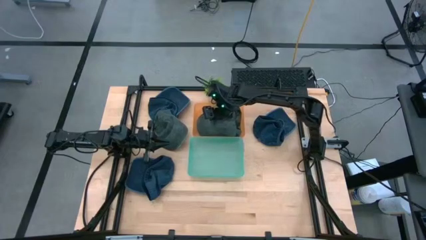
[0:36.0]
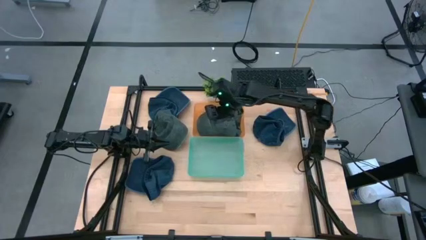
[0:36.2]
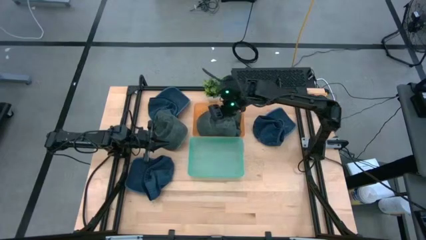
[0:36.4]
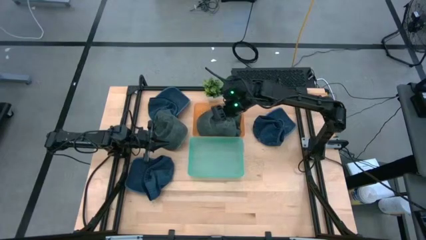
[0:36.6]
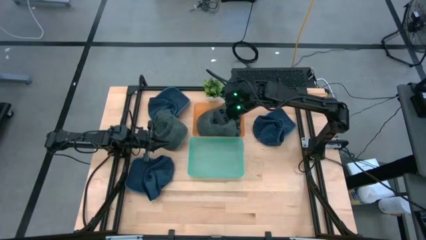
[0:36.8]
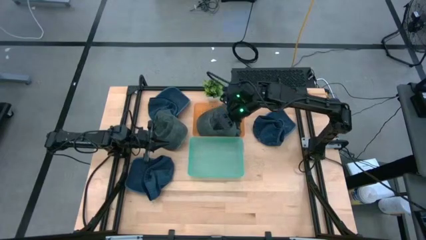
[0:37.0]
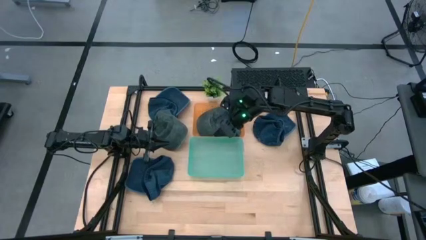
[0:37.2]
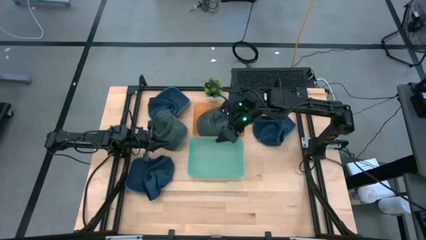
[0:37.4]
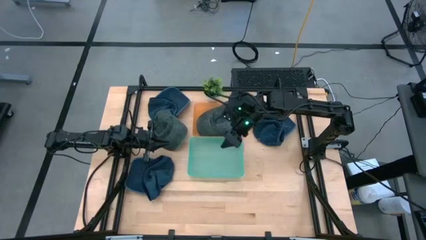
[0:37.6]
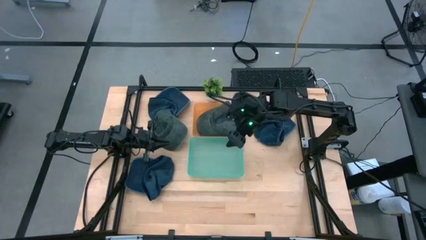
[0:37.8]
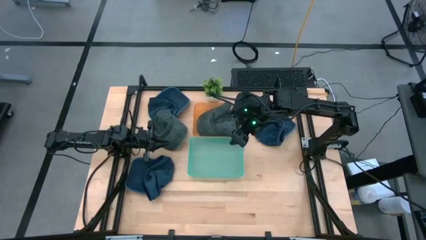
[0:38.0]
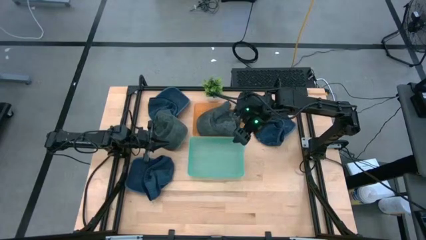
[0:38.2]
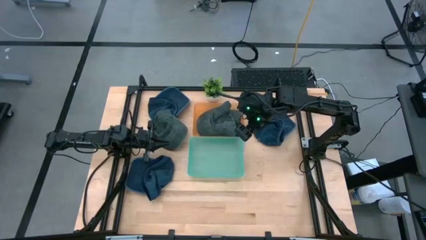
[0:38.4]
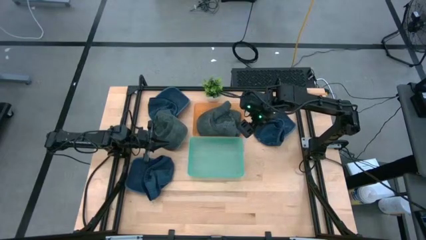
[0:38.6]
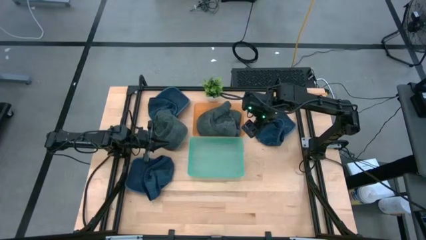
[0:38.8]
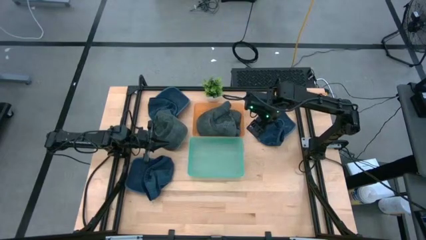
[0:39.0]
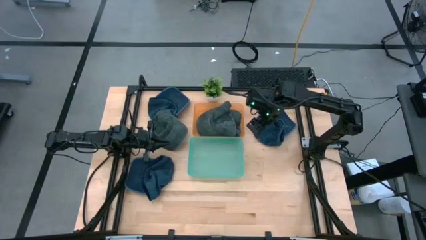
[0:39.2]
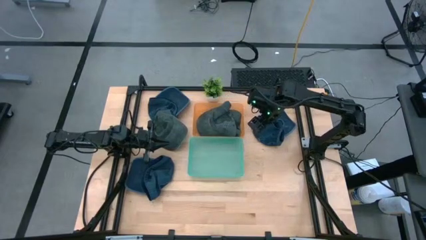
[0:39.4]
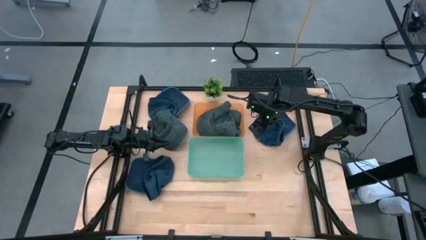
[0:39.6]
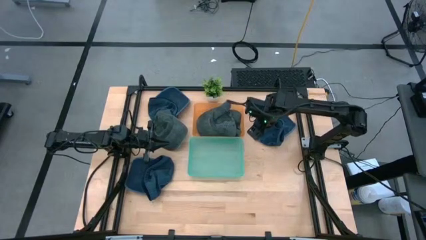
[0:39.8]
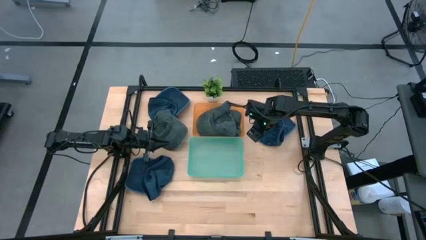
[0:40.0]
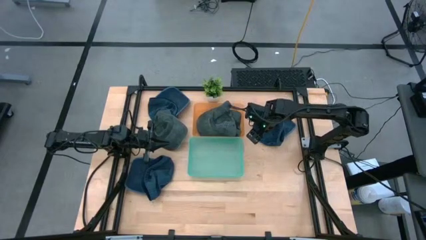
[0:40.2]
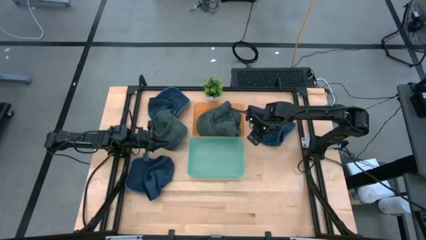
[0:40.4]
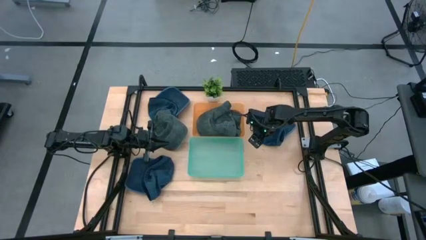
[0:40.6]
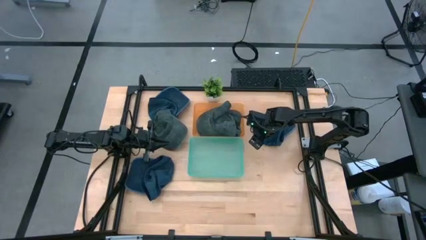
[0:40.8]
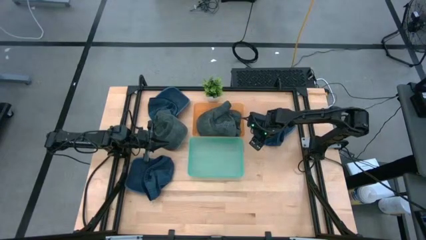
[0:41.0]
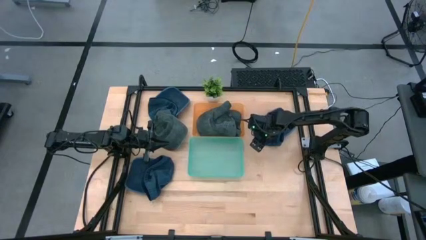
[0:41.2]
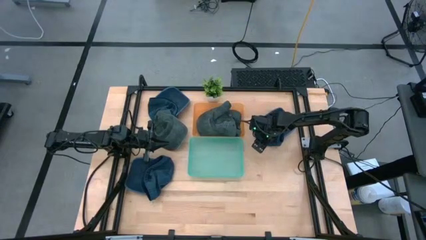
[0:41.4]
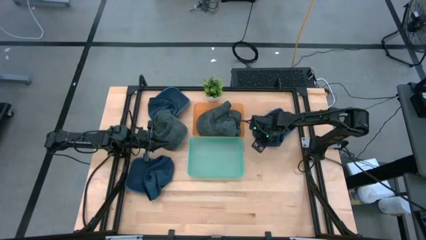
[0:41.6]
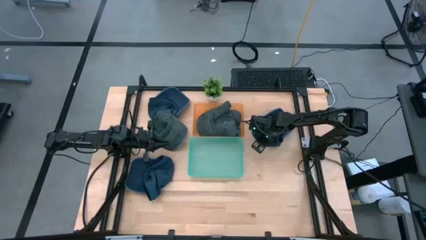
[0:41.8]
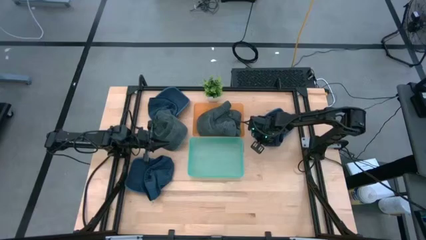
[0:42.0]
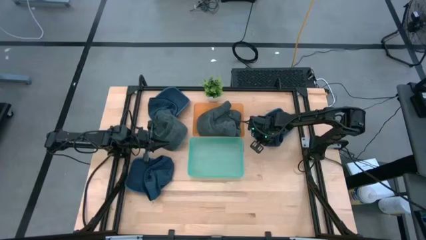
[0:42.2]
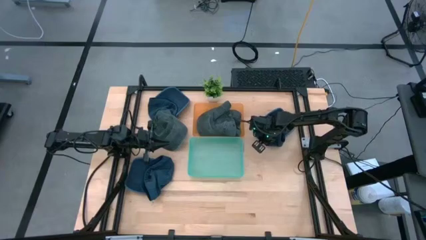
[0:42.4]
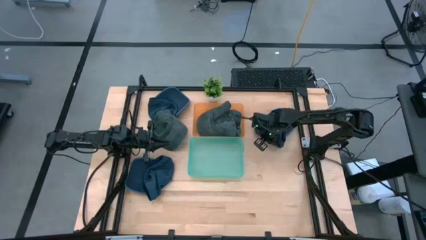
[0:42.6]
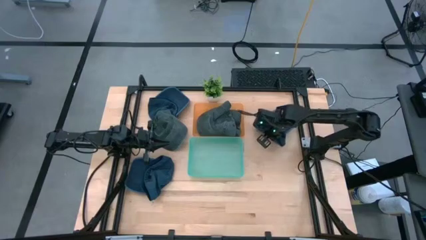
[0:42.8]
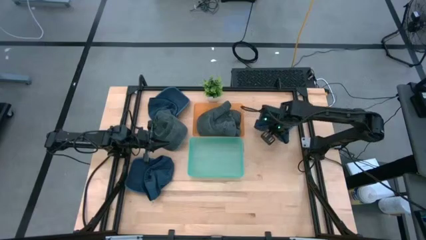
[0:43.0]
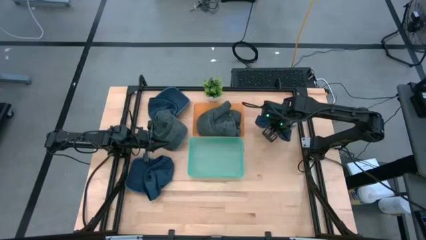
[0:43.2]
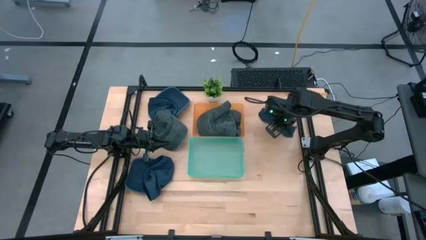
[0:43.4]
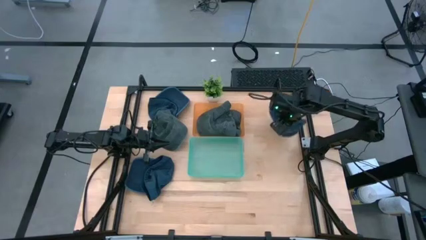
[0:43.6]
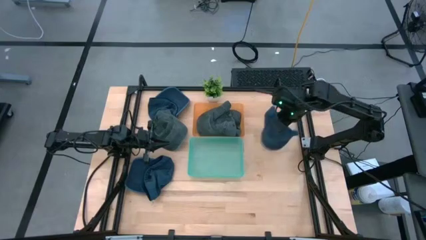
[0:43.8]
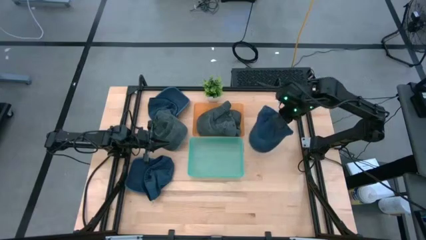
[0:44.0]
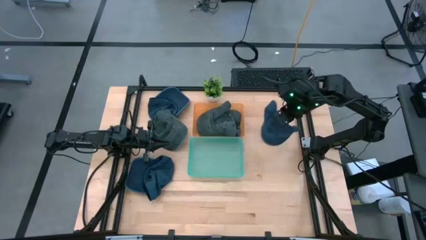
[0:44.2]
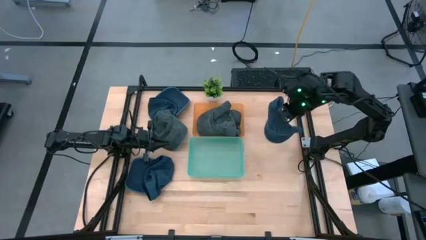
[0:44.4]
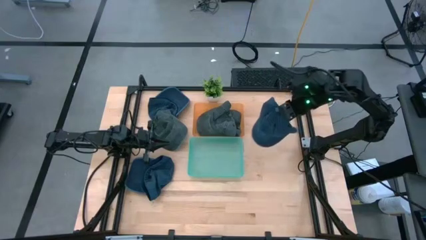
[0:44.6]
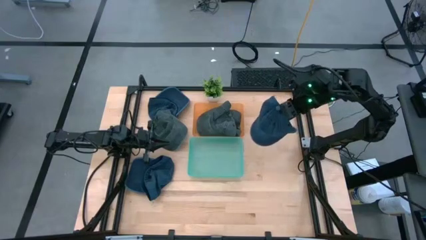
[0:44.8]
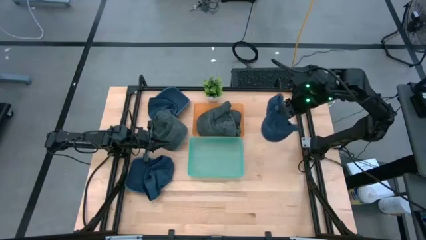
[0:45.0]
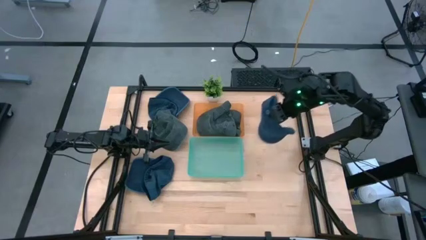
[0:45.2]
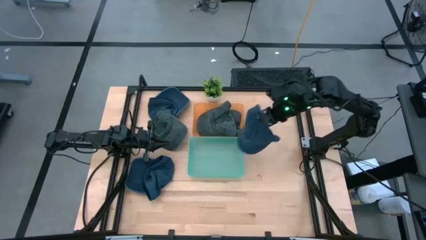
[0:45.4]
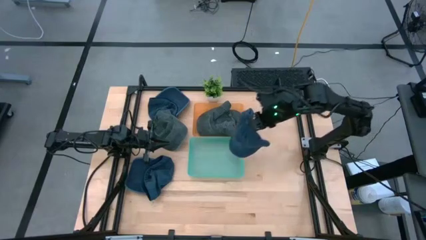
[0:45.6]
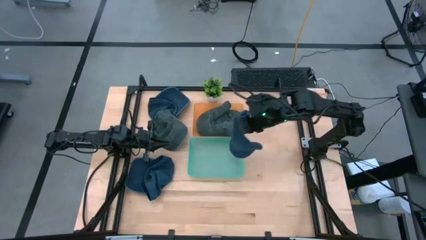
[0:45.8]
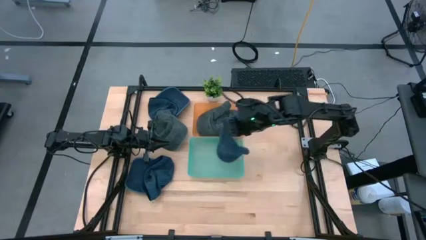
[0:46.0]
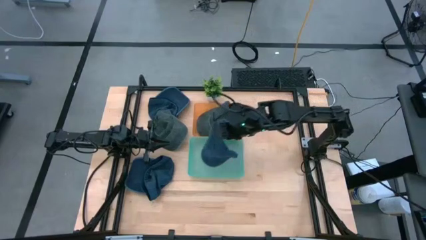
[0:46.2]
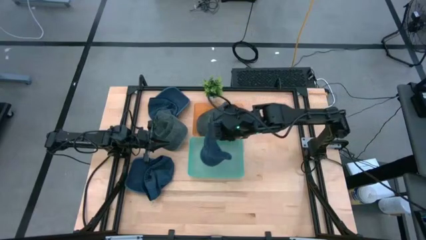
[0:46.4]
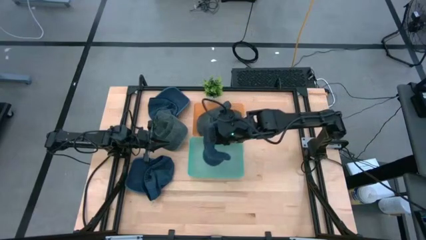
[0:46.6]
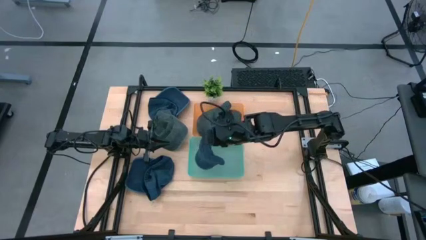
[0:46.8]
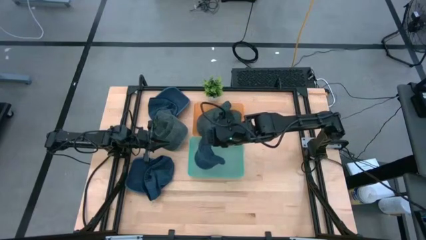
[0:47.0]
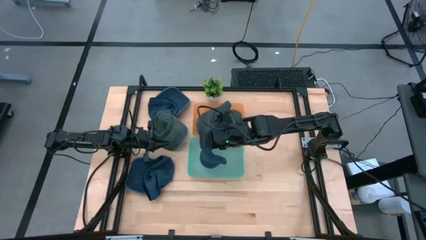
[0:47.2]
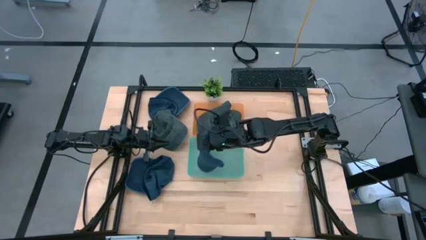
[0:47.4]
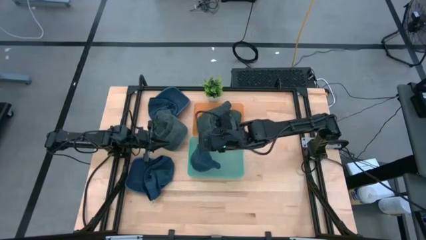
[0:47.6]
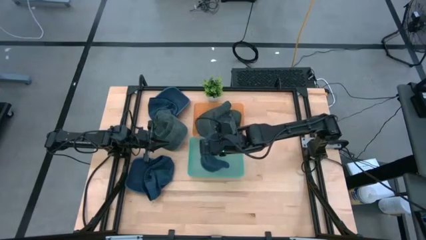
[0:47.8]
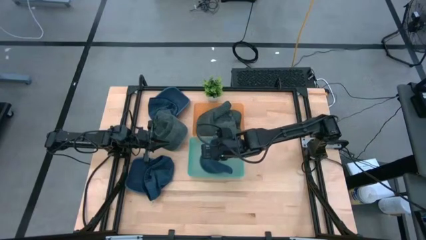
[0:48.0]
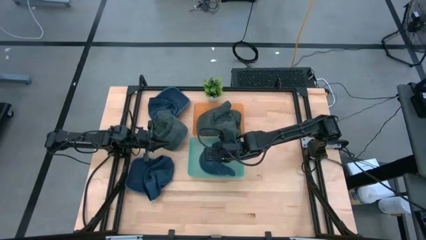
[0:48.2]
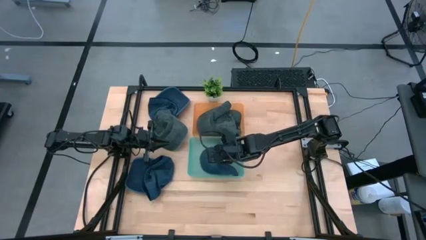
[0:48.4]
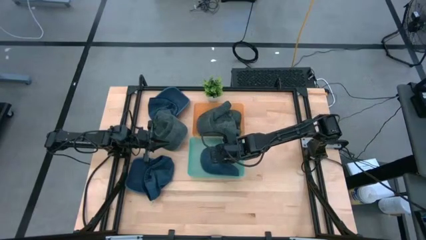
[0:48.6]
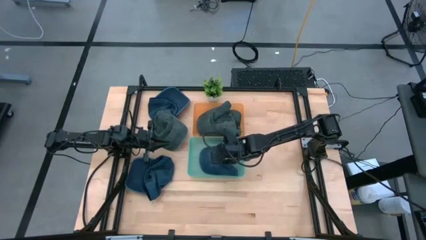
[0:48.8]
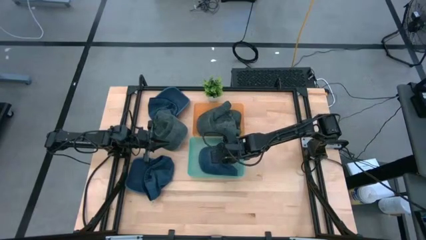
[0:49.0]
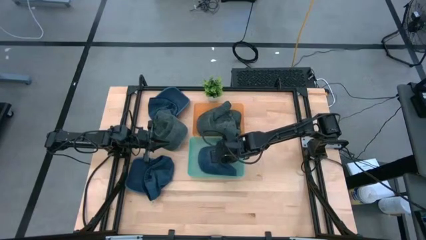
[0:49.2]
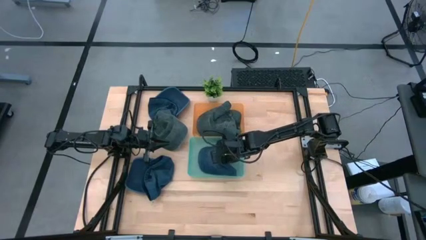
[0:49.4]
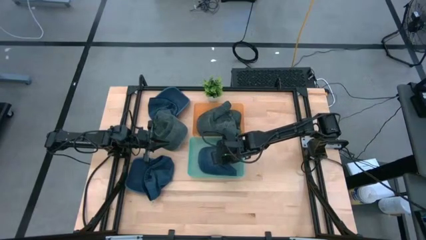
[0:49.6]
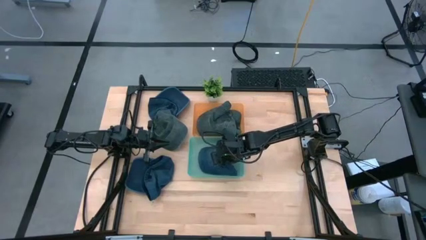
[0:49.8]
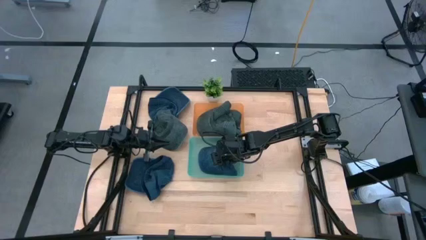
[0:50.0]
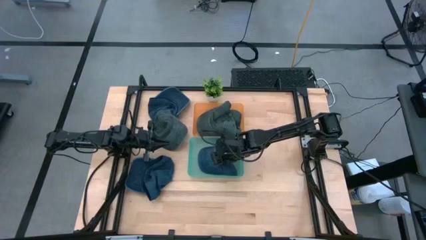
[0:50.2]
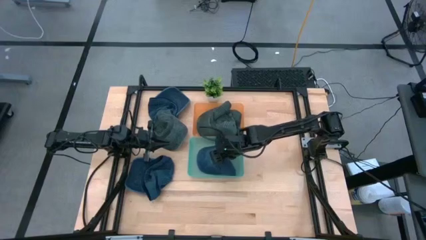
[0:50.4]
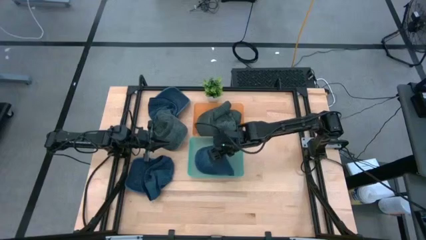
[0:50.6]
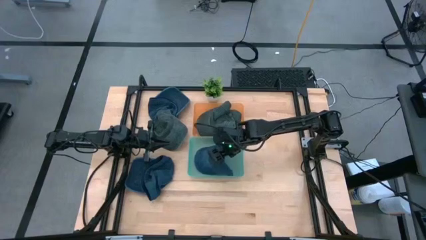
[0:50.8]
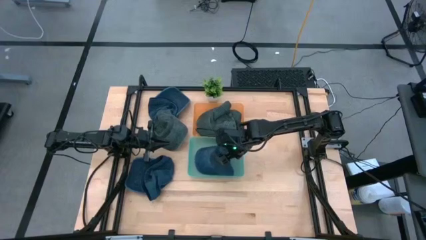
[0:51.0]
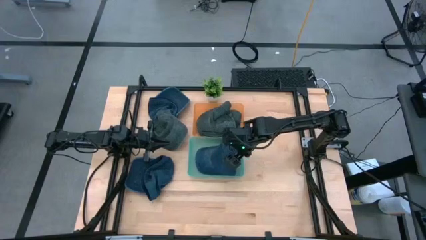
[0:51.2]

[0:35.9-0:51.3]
Task: Pick & Place hat
Put the top right blue cap into the light blue bin
